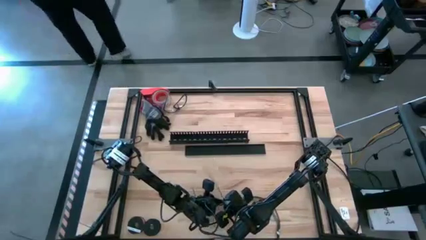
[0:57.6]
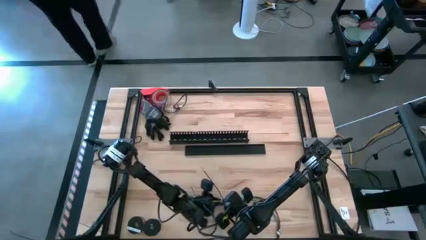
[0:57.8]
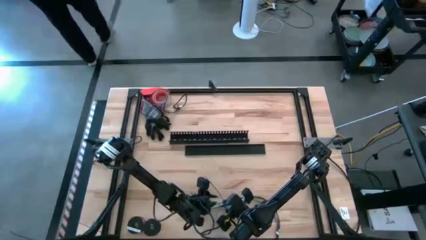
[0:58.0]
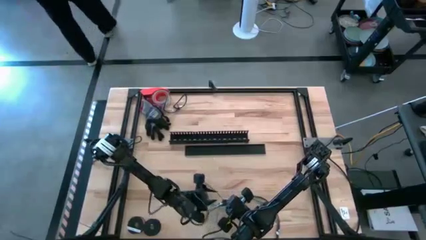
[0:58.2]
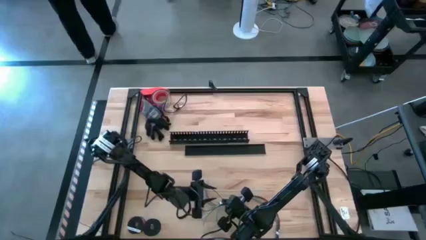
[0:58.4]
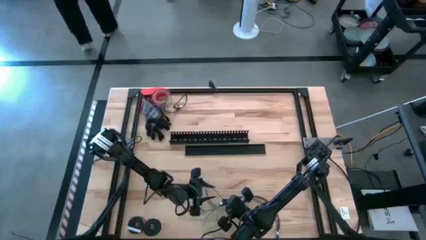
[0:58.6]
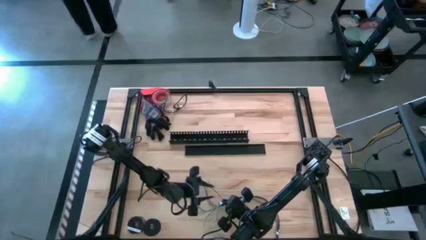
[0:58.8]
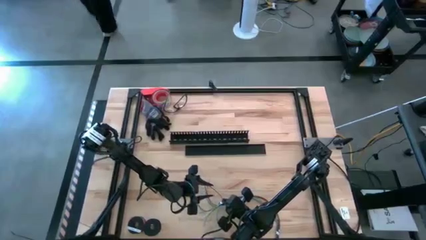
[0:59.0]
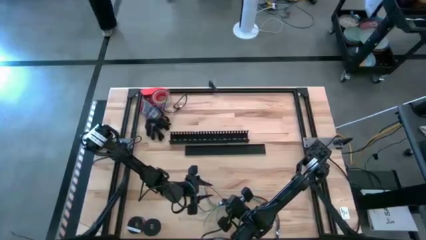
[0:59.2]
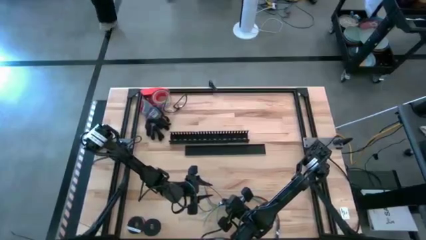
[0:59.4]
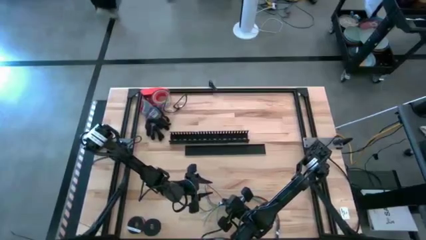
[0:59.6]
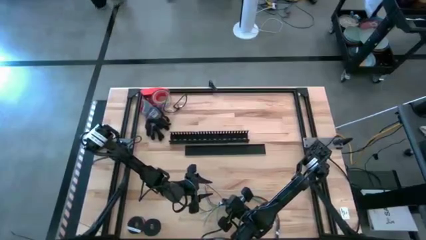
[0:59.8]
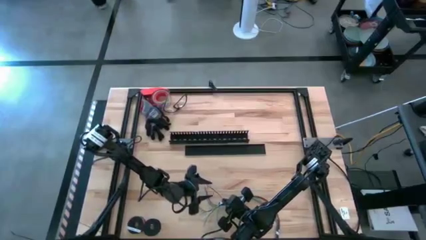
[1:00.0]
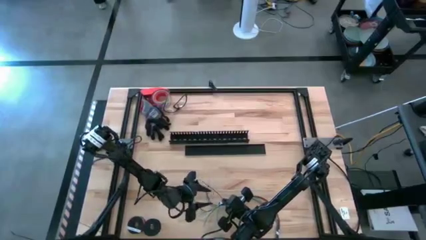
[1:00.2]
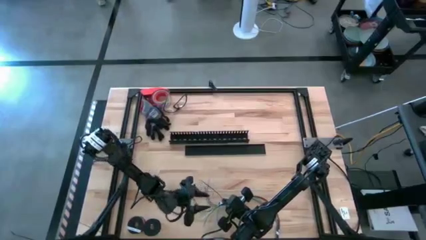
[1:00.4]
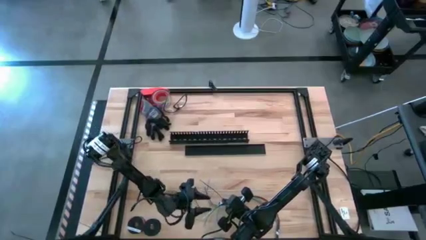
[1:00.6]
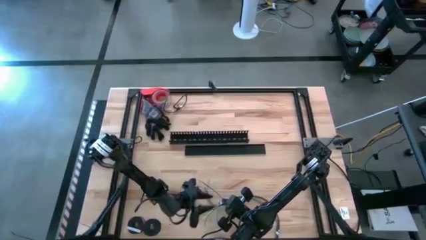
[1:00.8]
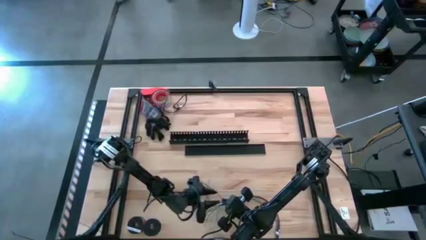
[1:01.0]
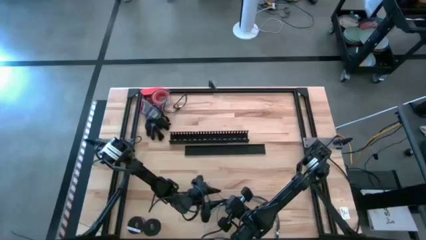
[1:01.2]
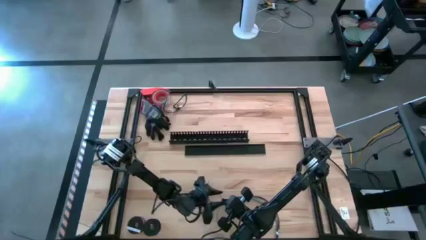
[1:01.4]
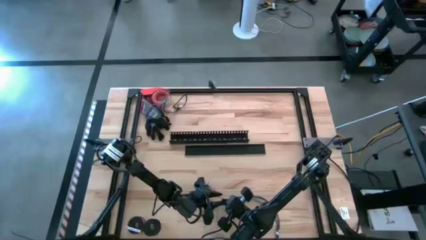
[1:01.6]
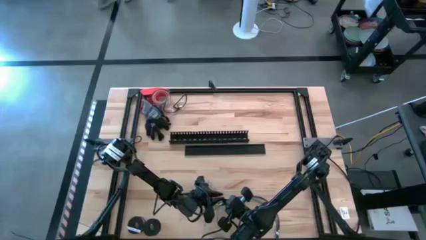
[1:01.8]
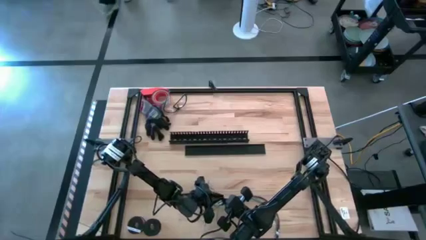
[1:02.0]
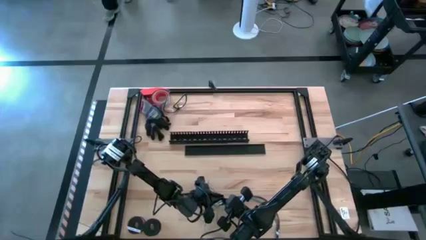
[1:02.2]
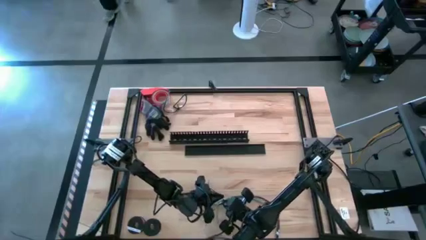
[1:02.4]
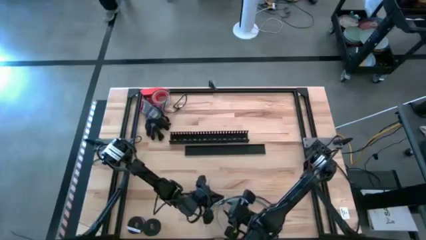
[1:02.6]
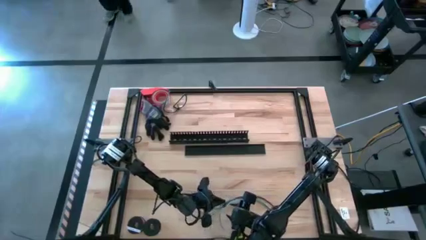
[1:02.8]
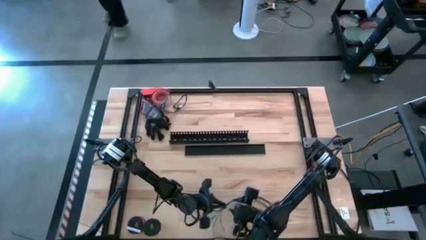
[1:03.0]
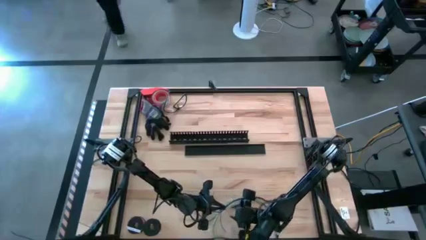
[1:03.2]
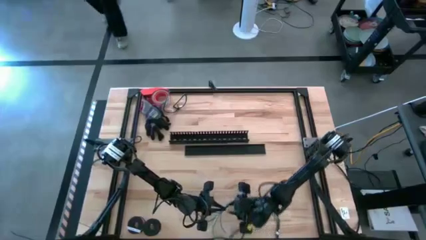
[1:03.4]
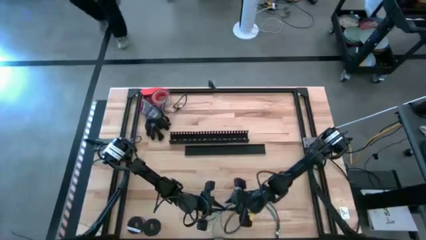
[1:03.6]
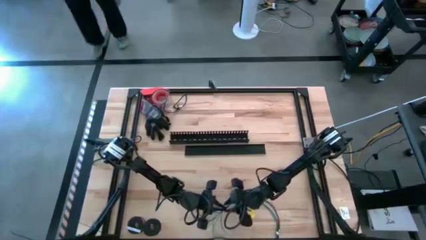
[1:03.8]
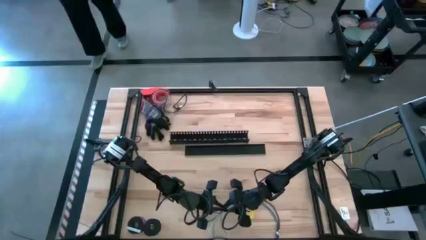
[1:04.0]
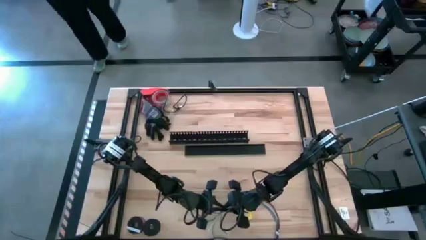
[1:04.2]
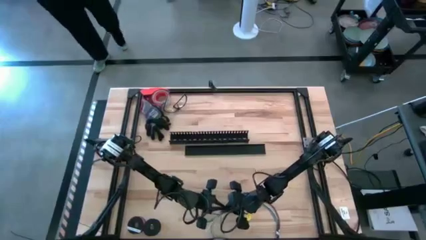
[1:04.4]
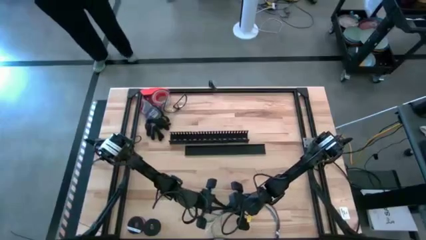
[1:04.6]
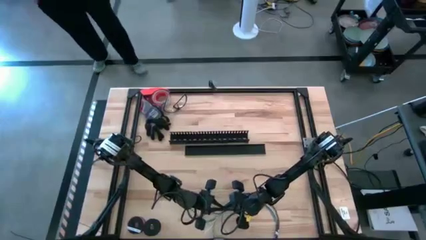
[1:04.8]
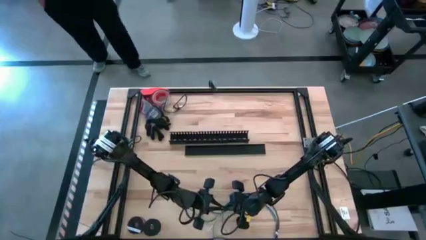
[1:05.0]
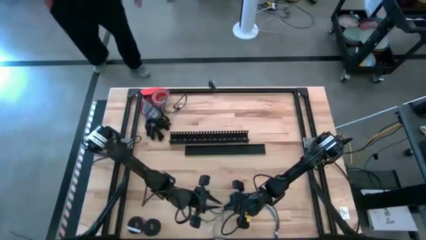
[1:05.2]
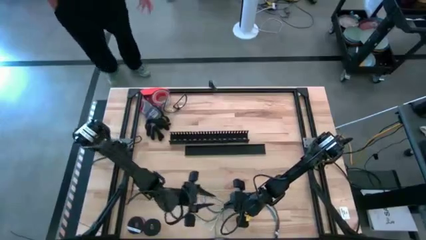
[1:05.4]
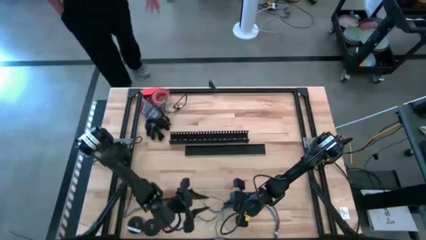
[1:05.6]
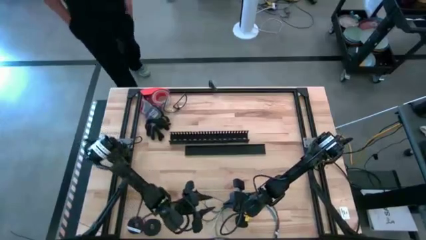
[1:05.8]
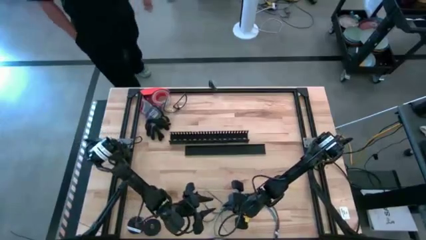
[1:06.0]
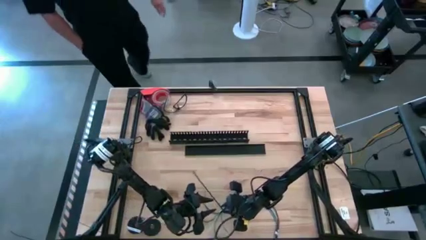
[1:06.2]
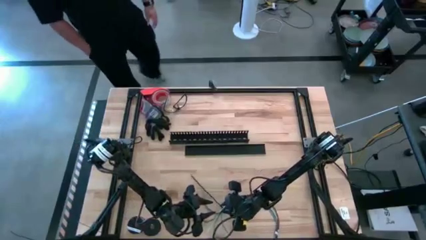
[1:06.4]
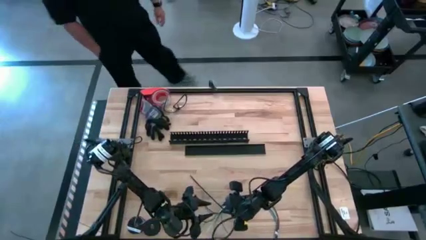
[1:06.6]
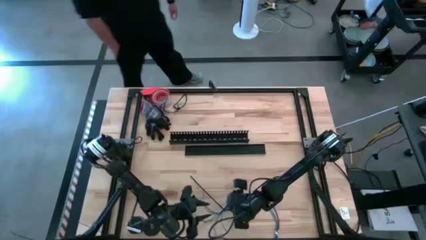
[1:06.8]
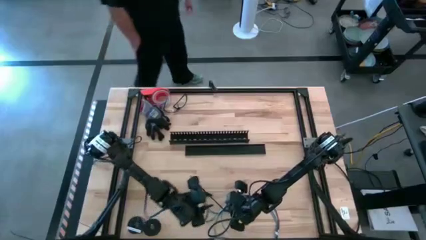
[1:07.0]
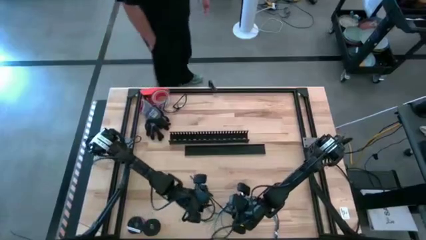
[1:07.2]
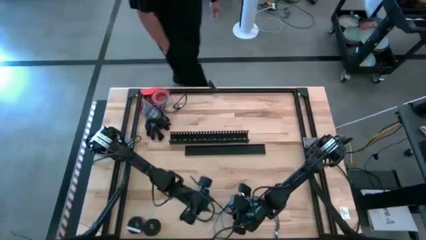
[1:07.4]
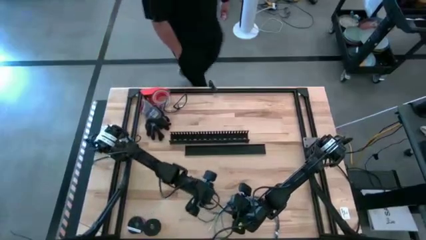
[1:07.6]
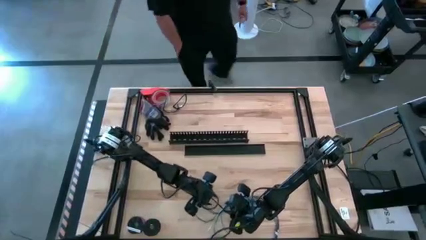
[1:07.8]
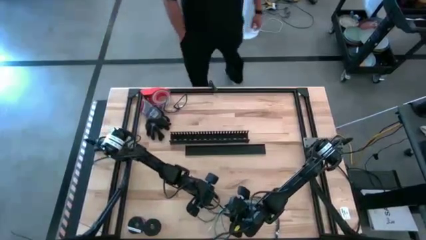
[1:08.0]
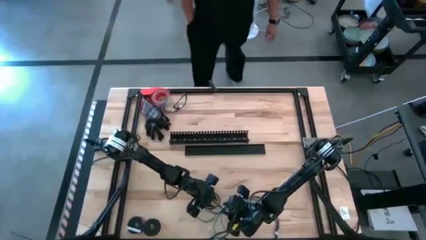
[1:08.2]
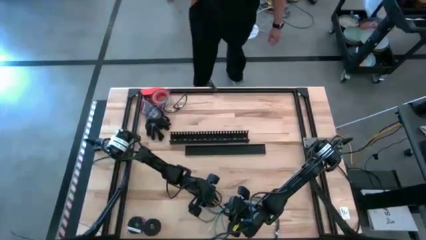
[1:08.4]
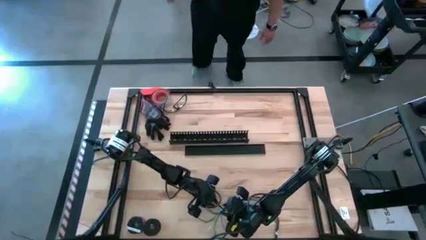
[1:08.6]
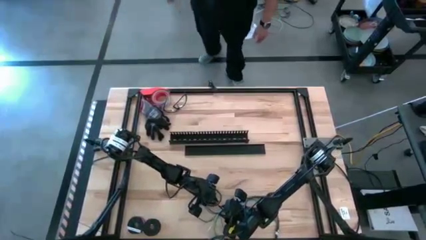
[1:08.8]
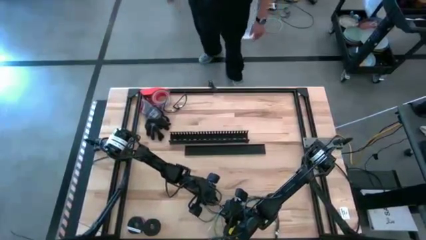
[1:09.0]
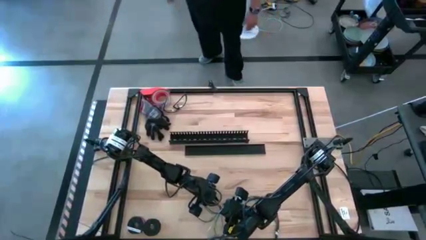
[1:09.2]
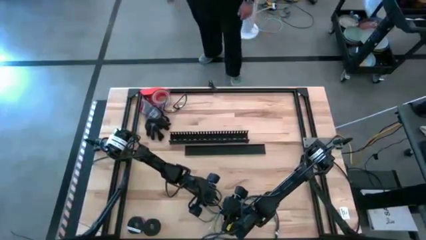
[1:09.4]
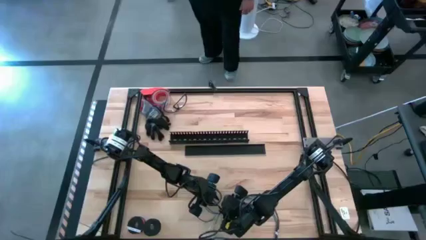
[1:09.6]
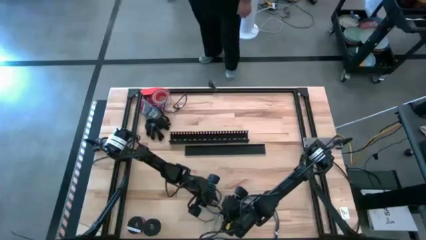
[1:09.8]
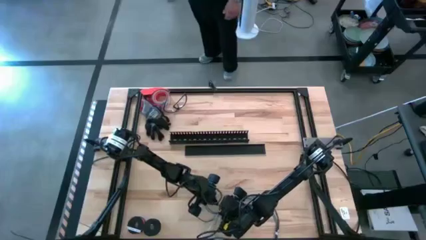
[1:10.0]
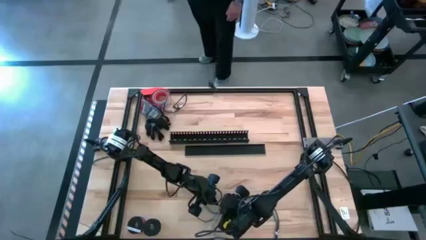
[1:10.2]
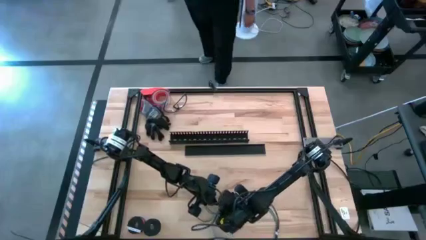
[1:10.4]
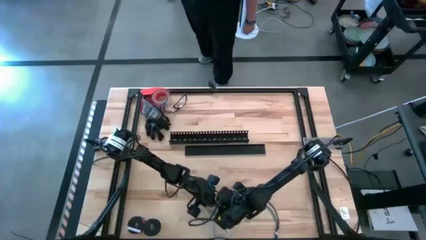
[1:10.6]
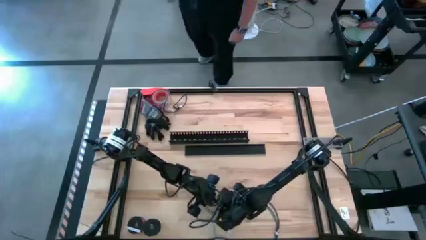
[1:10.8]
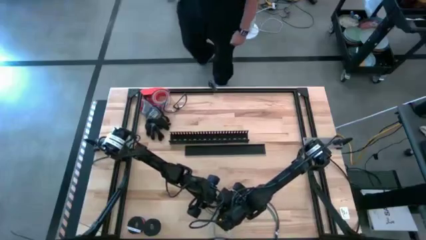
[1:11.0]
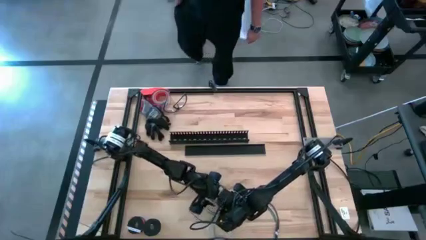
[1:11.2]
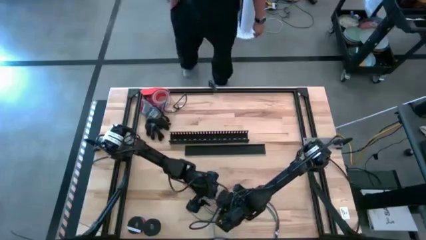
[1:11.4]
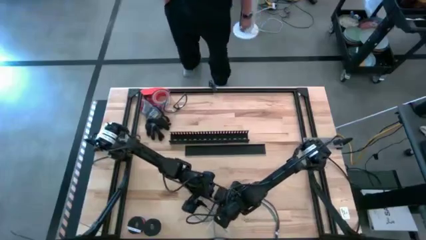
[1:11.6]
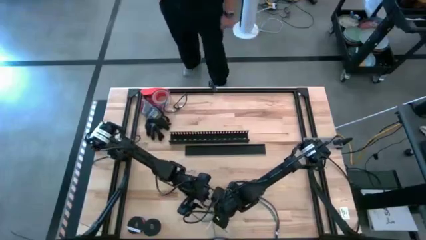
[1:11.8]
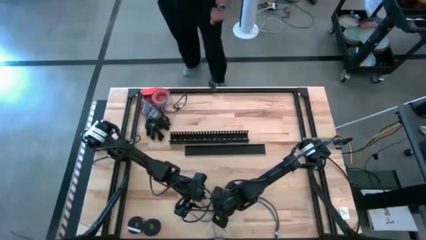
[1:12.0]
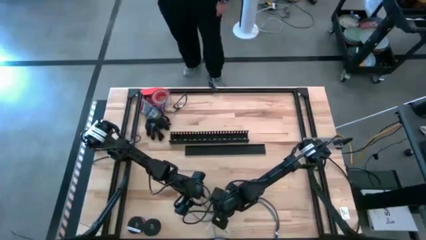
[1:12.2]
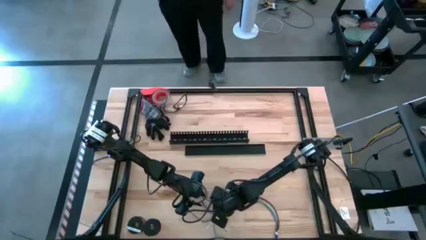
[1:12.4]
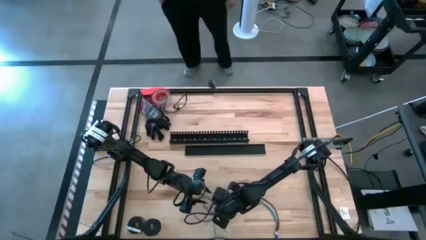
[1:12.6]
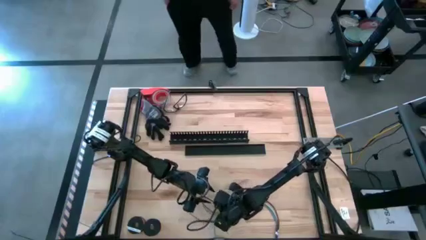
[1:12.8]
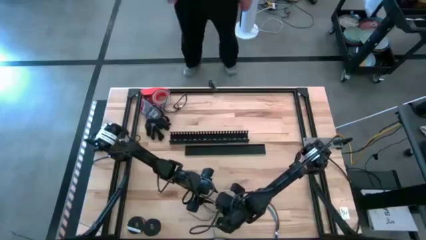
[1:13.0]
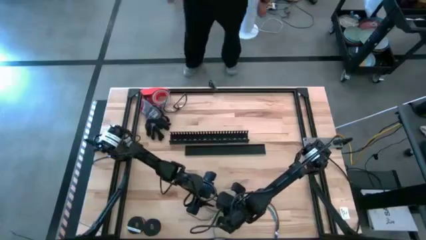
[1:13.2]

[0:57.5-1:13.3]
Task: Ziptie cables
Wrap the cable wires with the black zip tie
